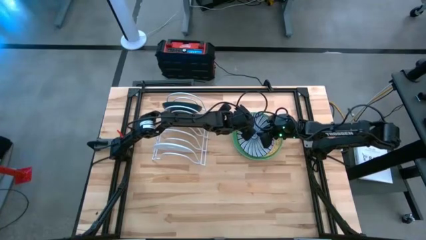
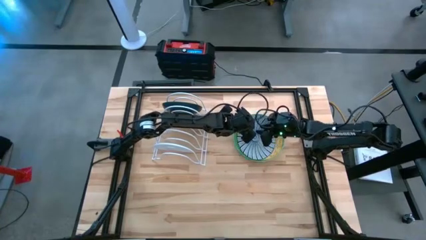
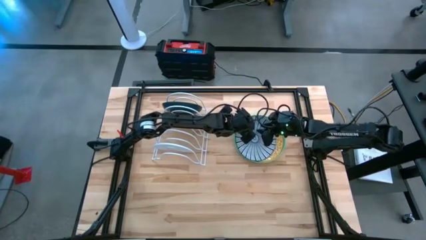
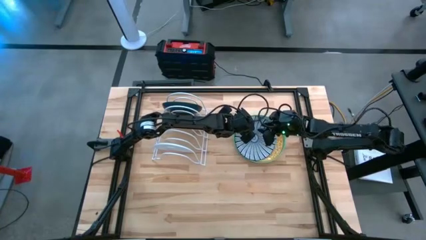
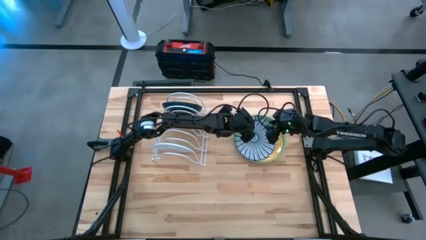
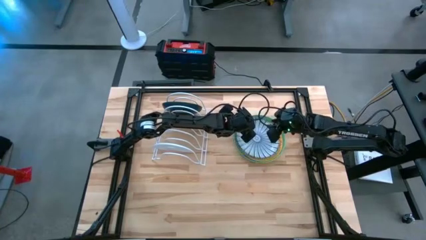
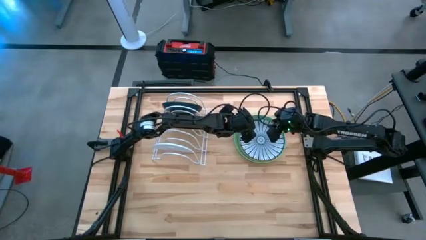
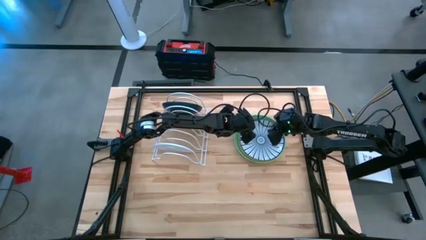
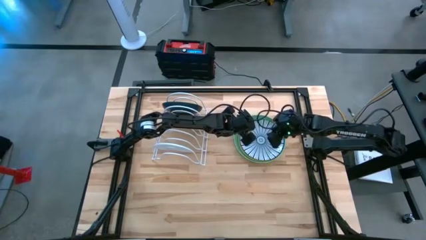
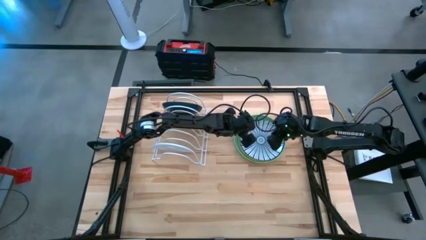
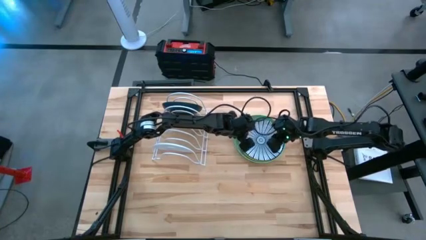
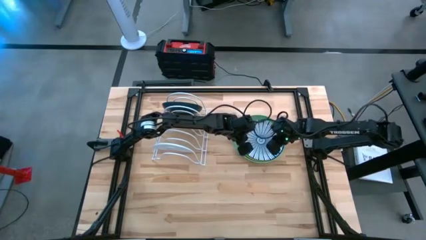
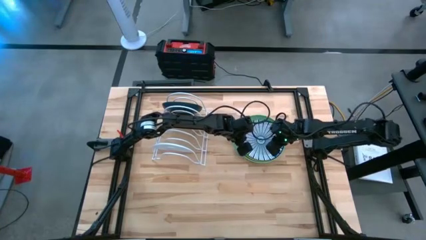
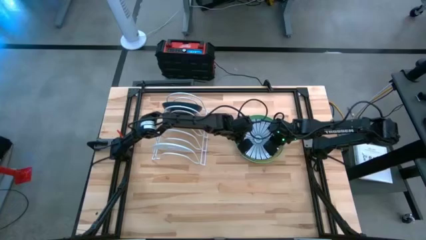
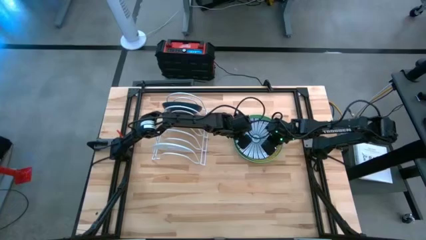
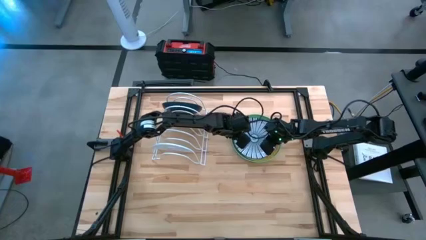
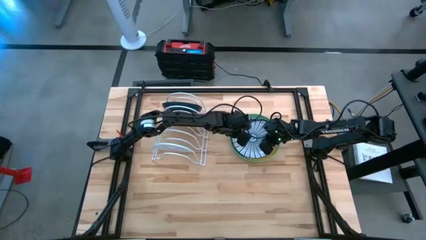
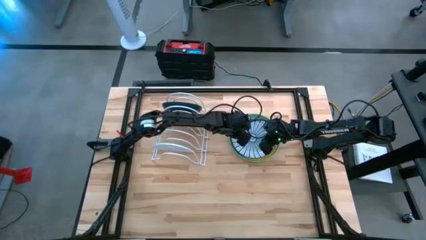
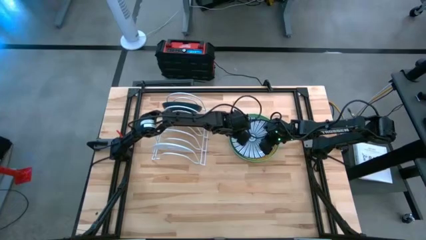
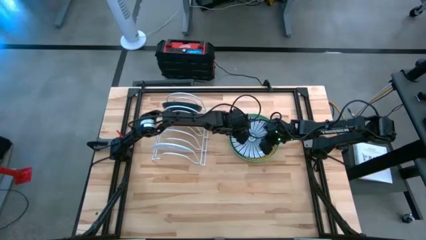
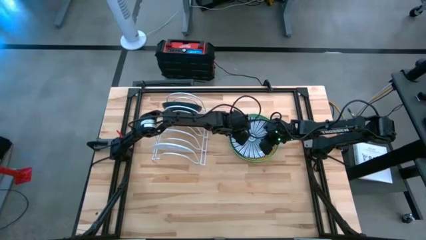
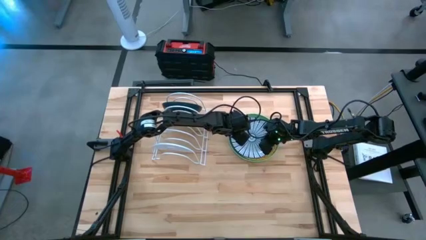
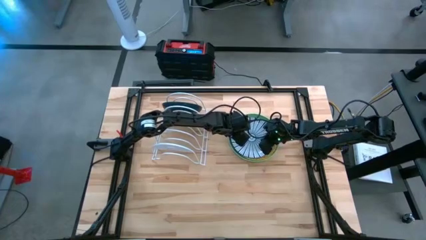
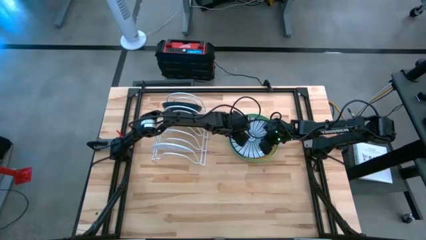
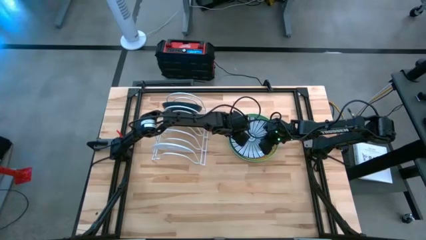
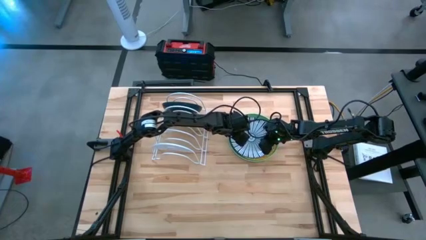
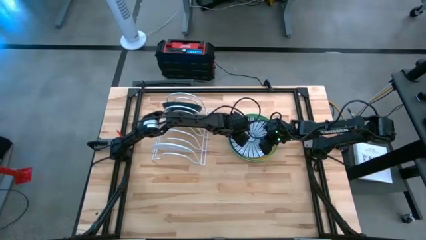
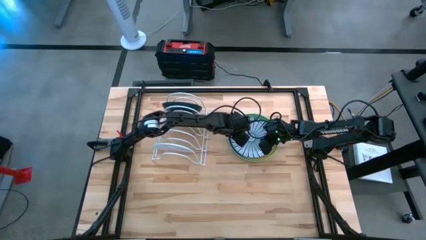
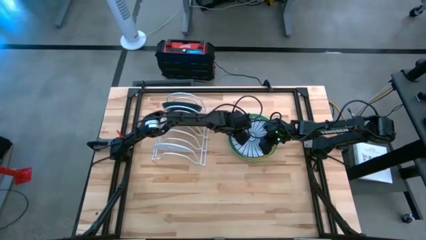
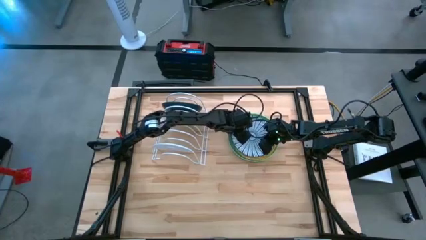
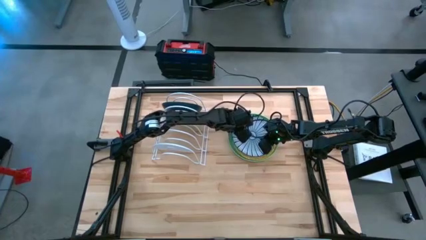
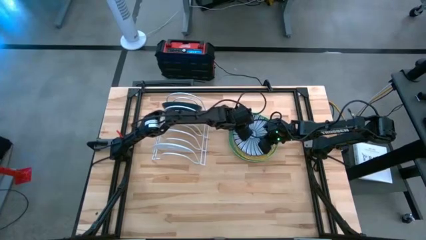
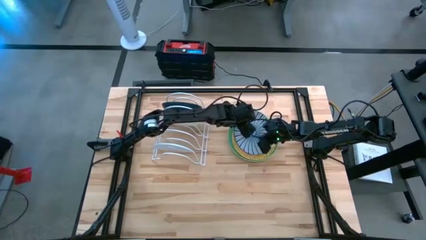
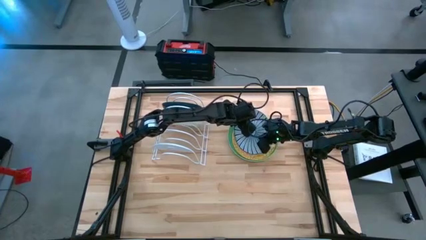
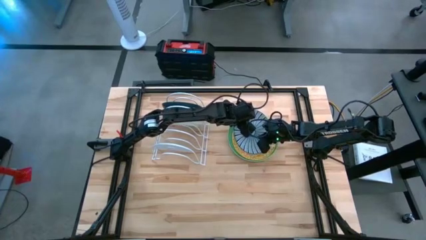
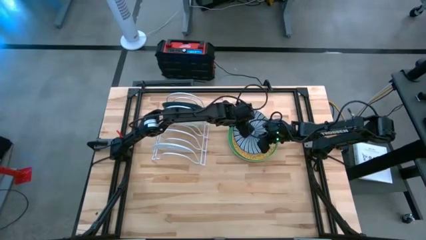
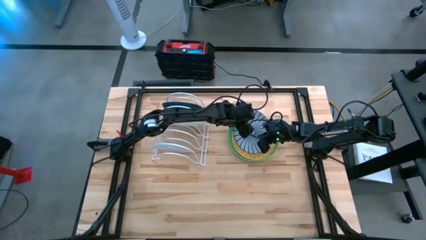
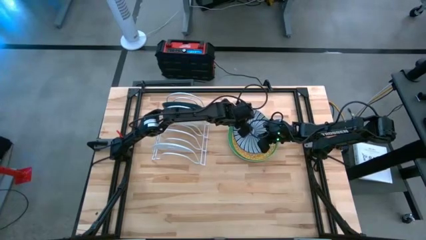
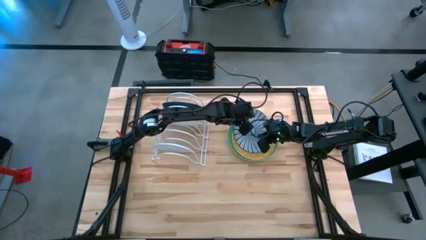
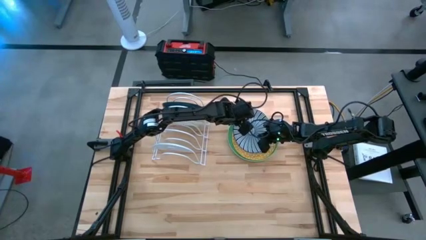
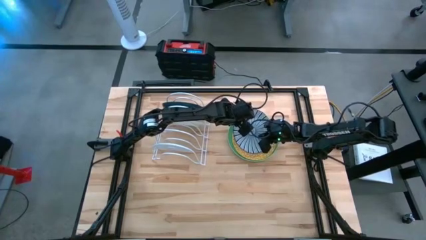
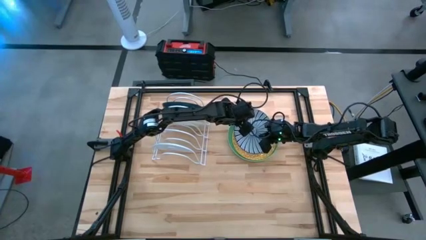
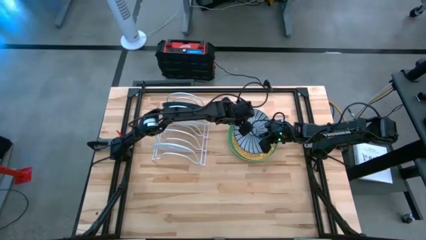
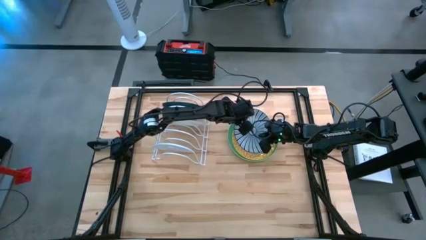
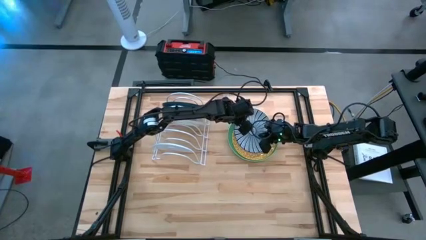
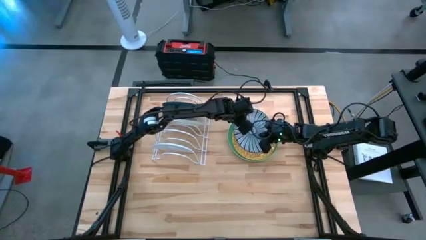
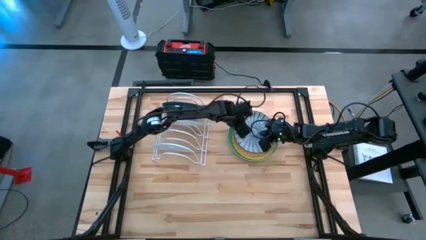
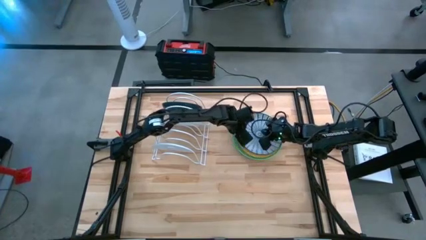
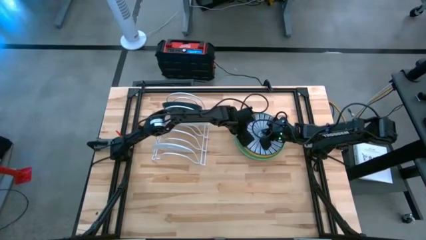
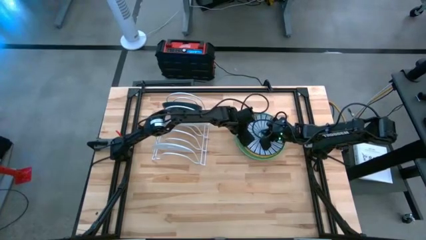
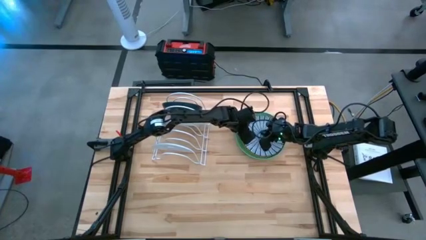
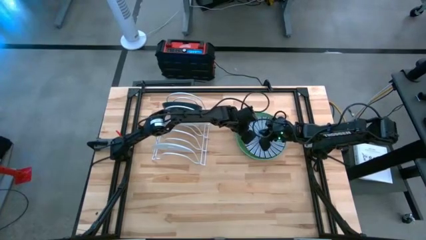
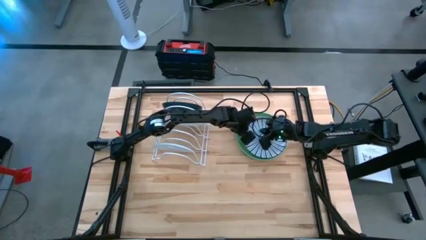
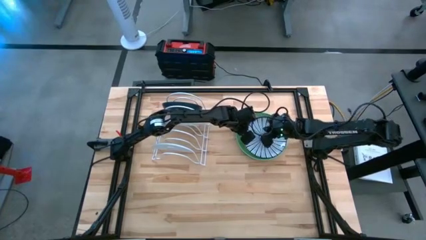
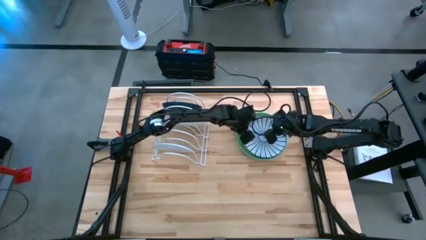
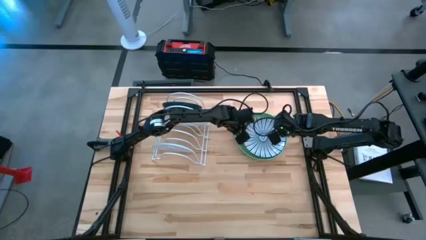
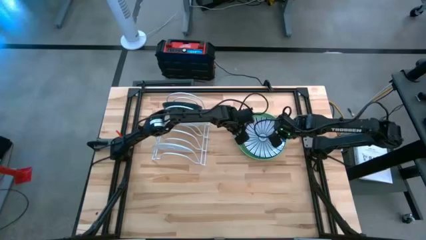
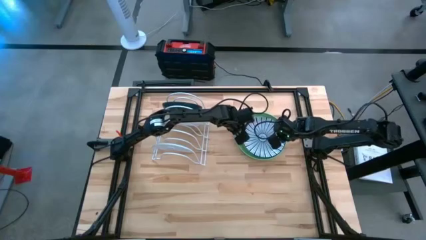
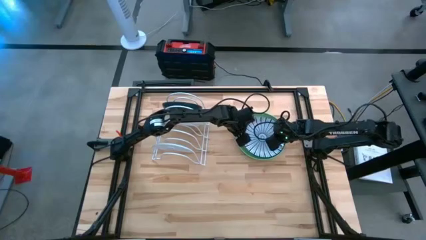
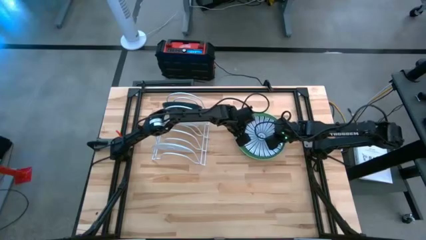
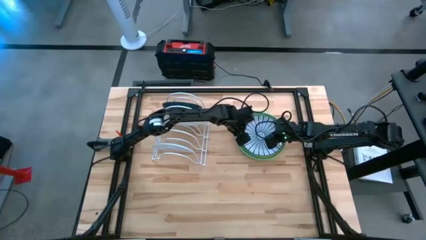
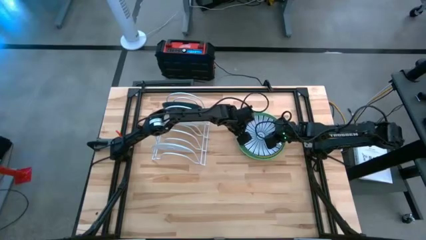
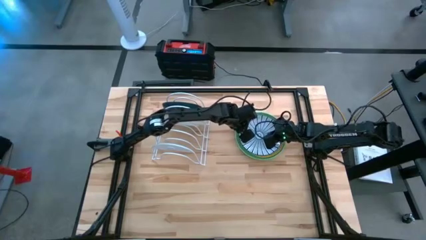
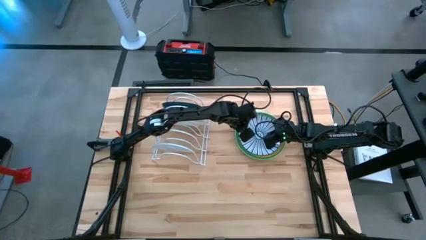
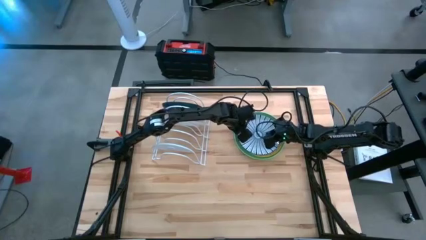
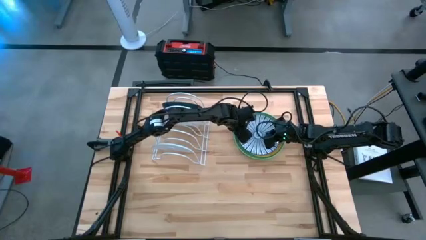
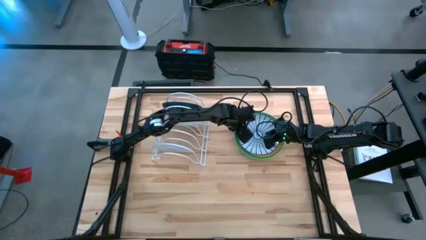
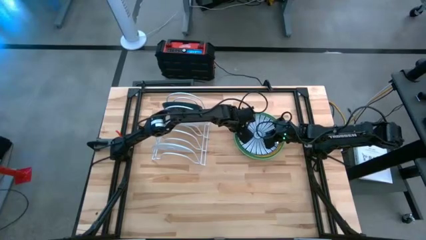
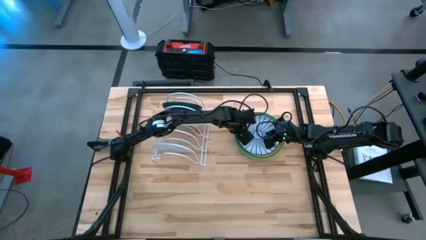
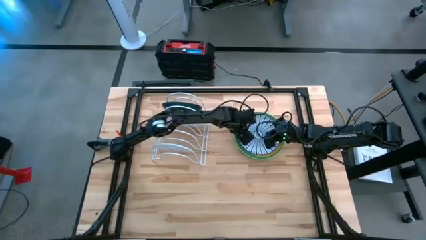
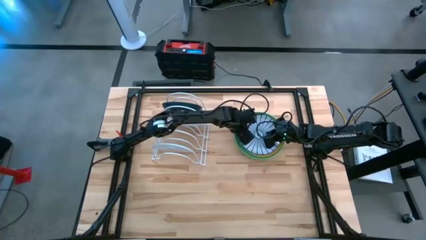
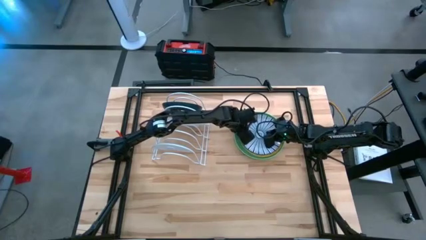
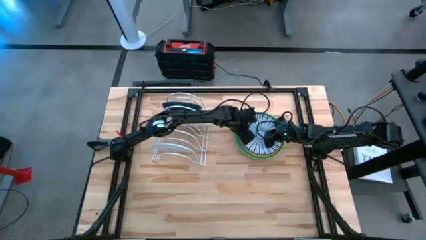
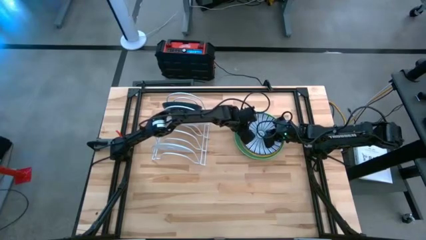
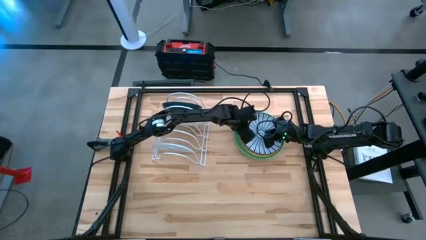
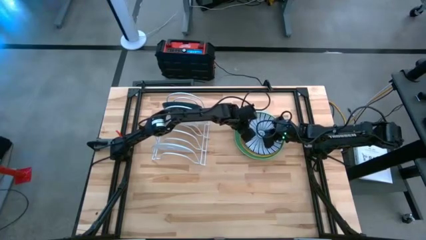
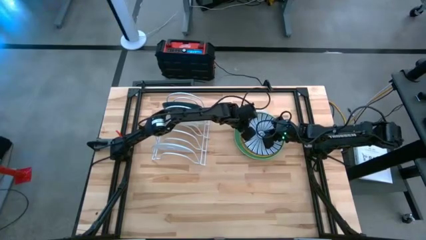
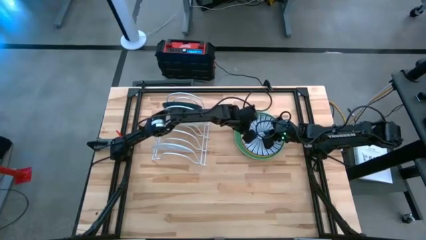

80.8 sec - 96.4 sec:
Task: Sort dishes
Put the blue pattern plate in the dish rack
